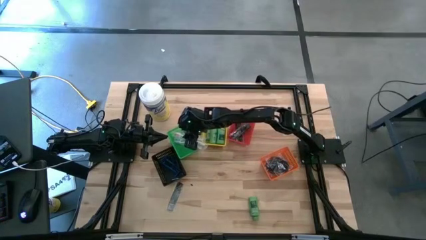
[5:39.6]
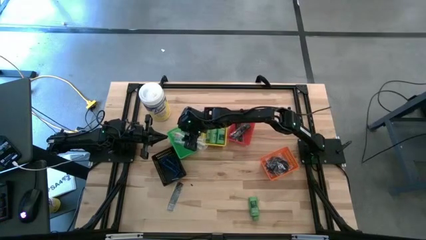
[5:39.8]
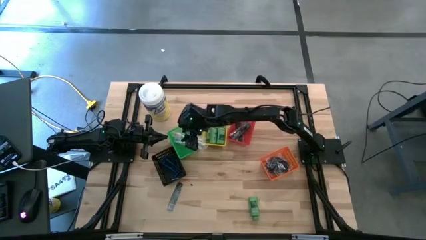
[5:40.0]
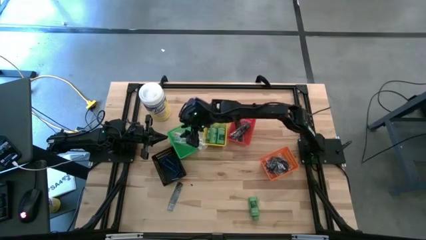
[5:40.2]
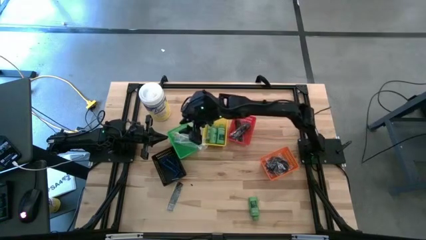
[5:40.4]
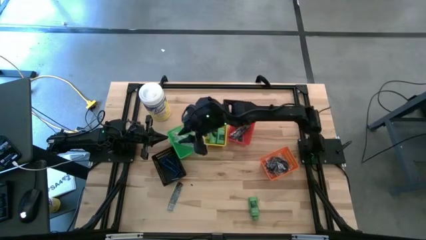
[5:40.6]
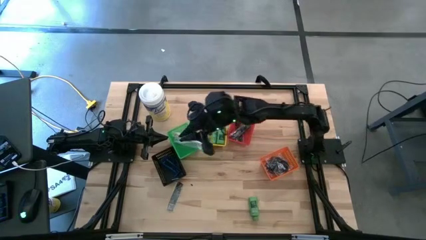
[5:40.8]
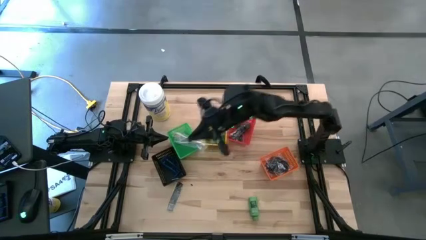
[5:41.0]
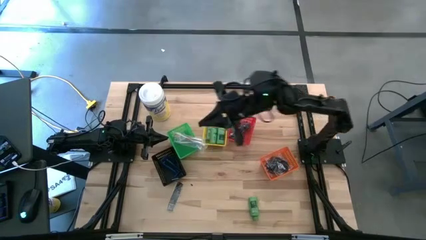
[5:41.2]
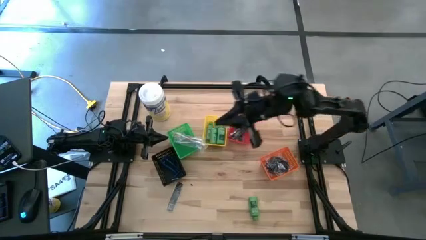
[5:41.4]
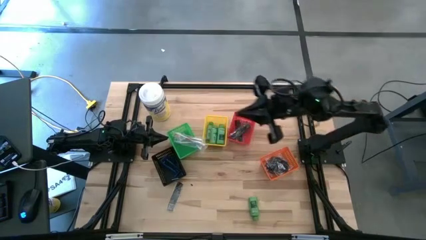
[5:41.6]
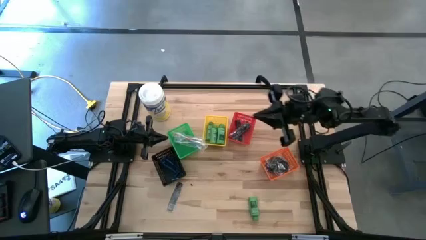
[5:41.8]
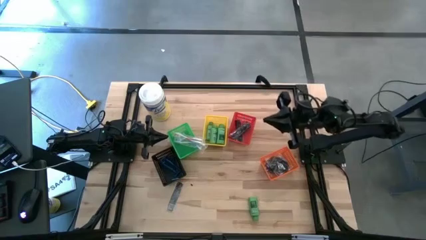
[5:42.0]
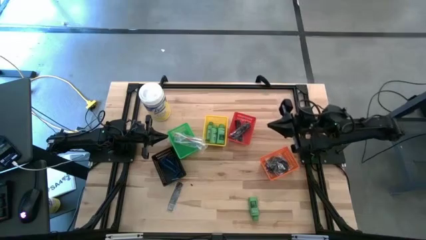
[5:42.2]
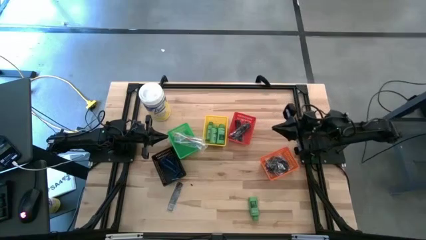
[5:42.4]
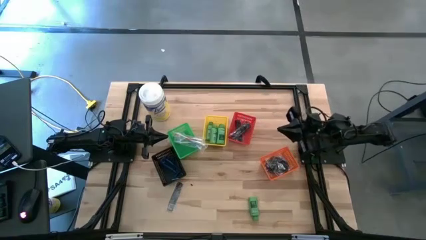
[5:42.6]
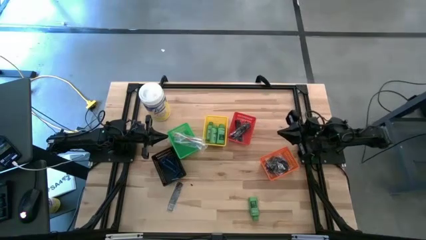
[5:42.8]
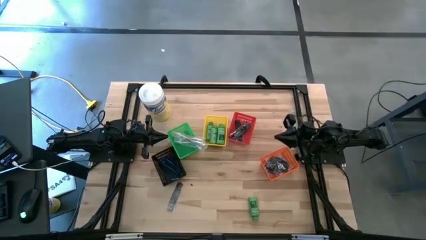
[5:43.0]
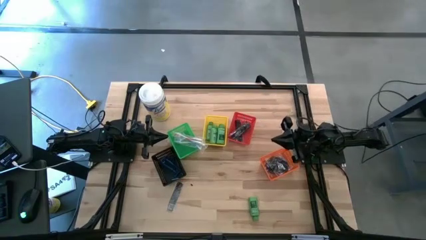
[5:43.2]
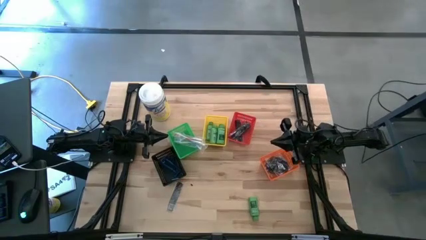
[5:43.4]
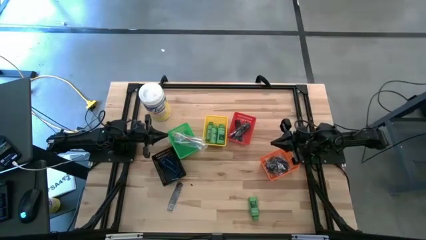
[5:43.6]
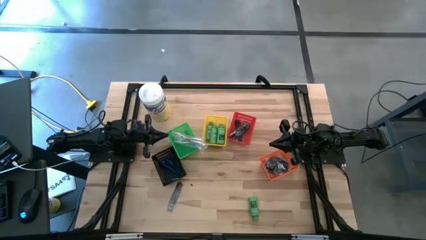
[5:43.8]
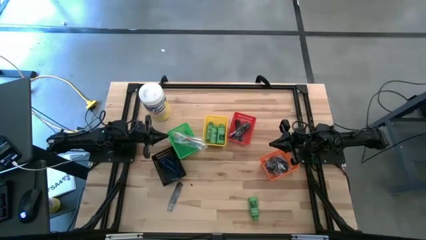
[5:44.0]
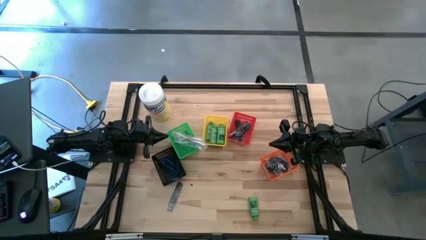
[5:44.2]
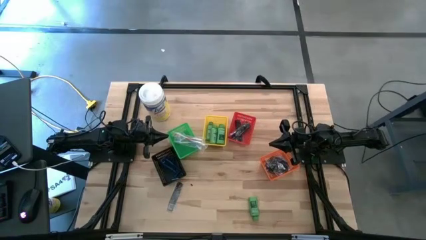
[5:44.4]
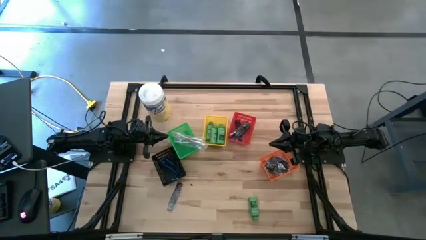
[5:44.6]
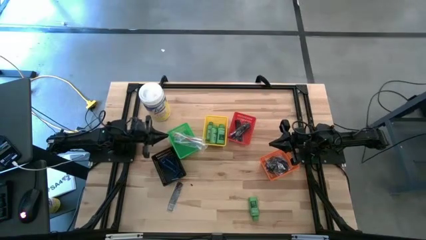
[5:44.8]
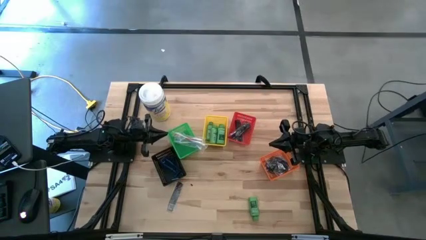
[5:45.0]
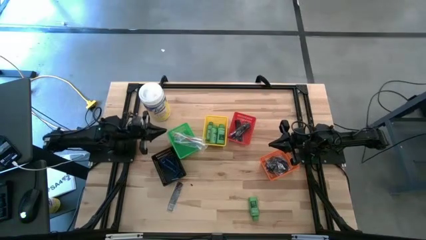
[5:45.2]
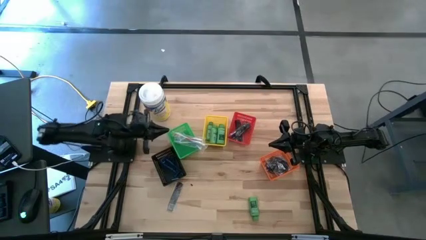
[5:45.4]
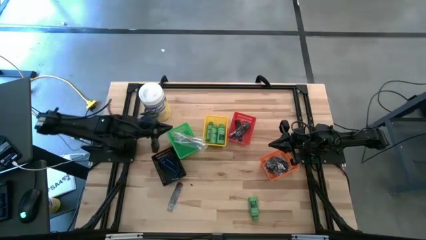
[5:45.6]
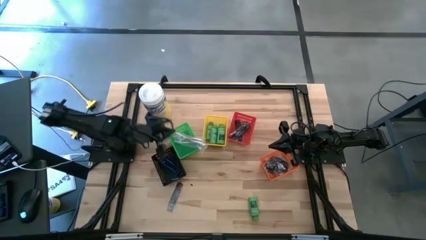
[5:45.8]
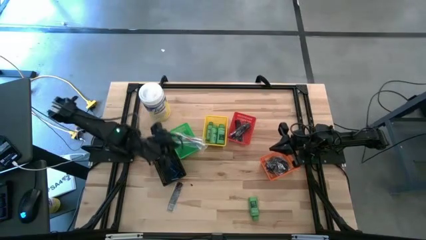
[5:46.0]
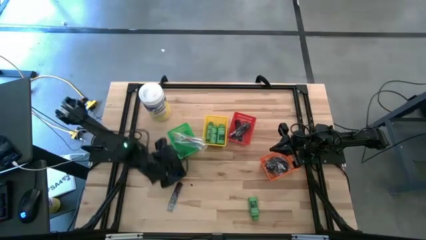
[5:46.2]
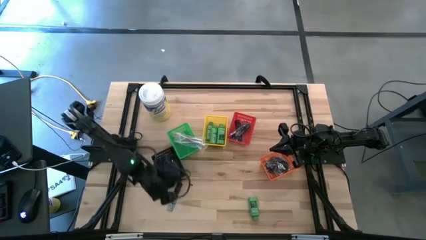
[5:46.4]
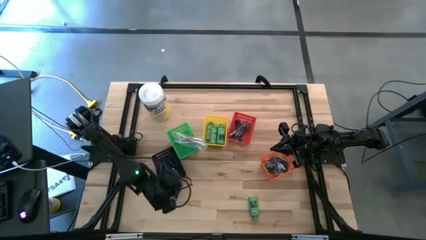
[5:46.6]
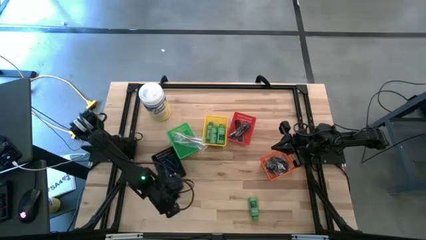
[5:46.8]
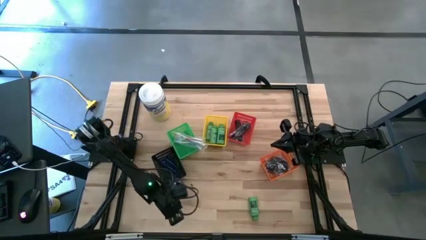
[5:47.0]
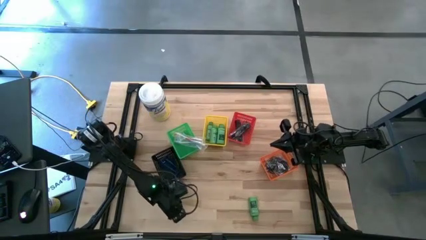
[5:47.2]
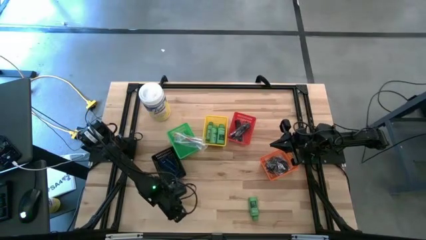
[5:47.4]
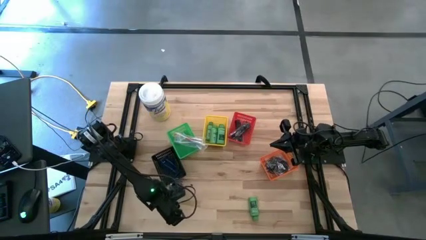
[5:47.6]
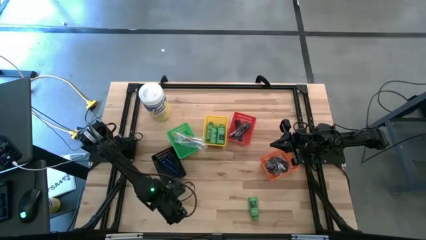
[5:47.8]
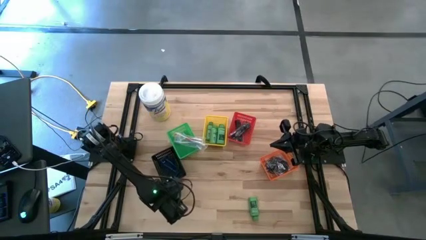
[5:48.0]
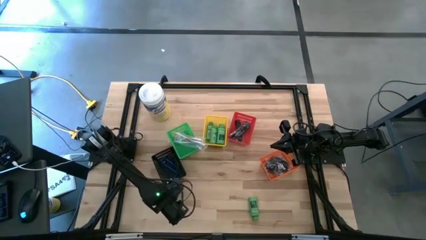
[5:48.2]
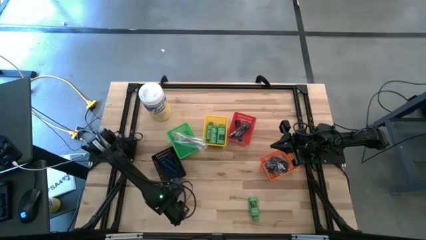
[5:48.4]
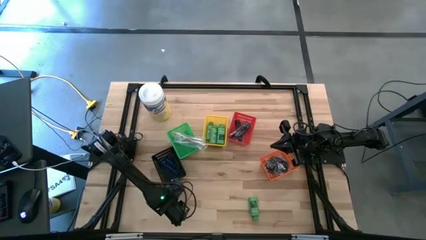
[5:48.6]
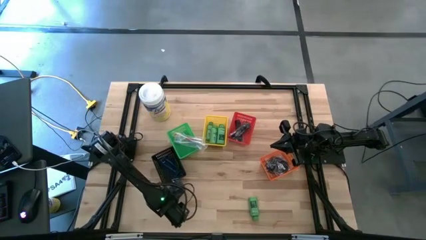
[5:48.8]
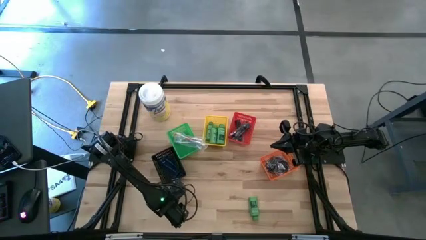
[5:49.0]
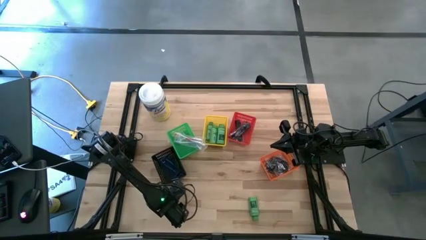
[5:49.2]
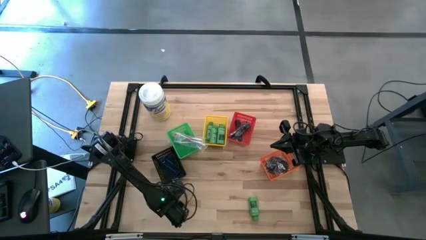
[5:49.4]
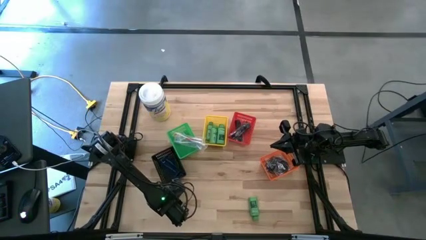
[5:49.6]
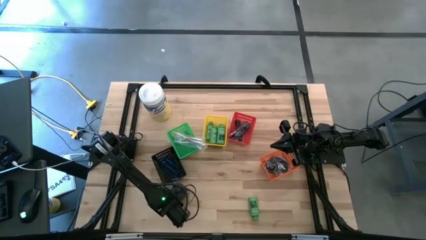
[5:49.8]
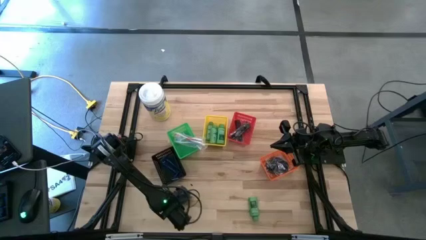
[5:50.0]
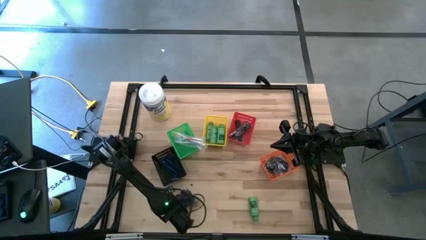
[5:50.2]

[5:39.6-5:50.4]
Task: Pick & Place Travel size toiletries
Put the black comb into the red bin
